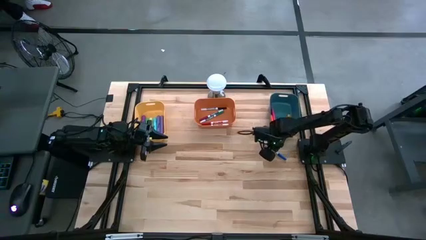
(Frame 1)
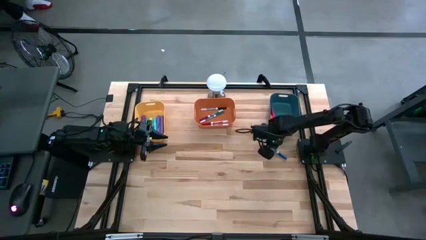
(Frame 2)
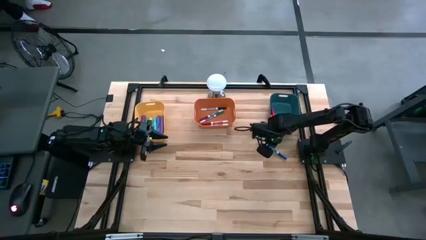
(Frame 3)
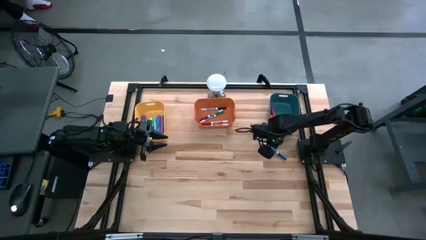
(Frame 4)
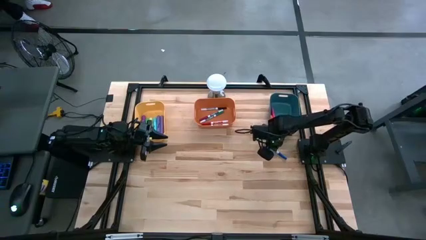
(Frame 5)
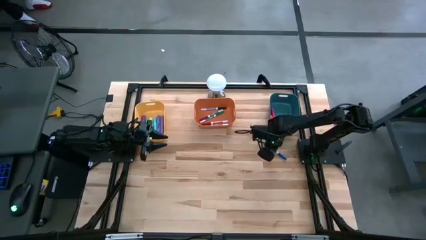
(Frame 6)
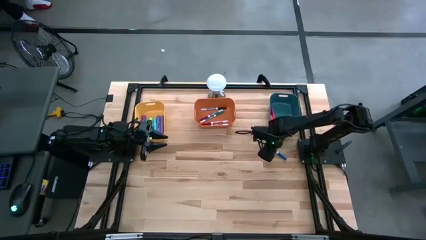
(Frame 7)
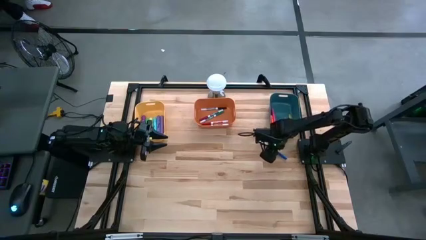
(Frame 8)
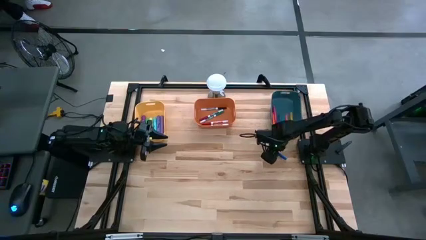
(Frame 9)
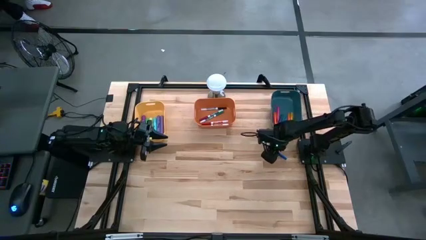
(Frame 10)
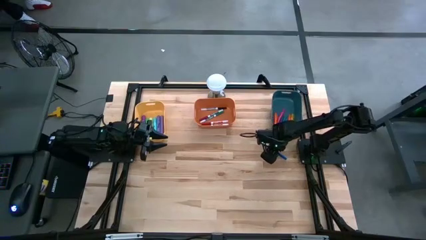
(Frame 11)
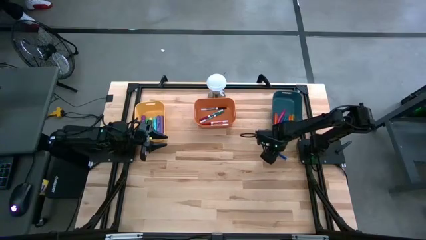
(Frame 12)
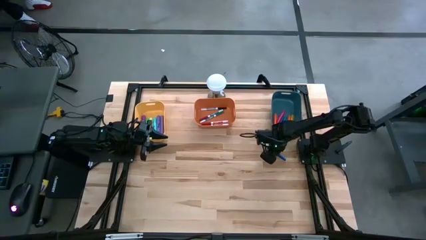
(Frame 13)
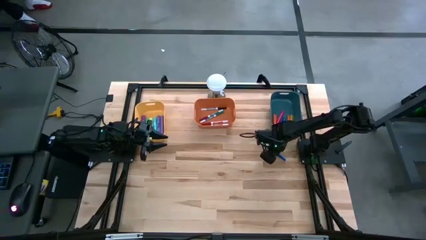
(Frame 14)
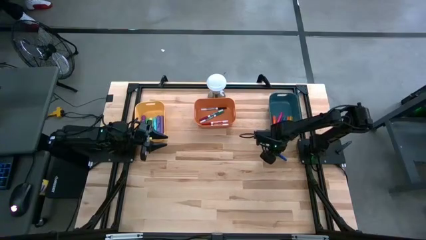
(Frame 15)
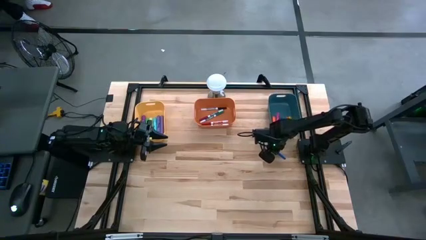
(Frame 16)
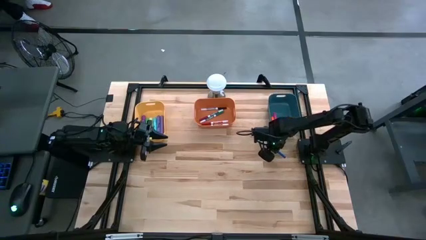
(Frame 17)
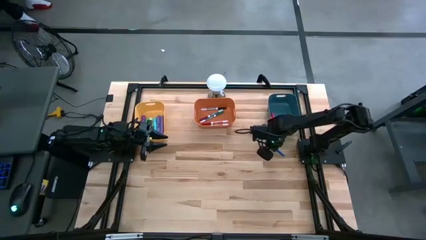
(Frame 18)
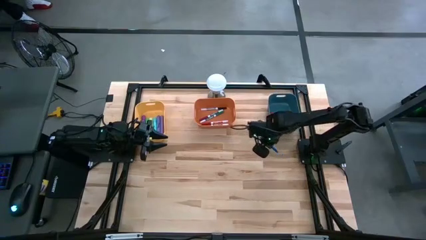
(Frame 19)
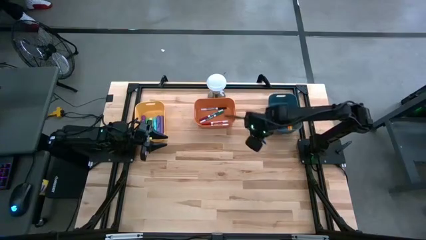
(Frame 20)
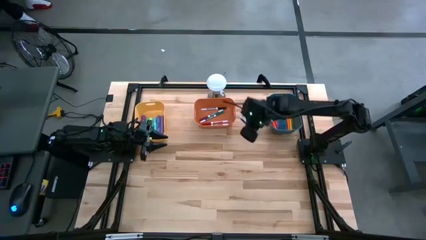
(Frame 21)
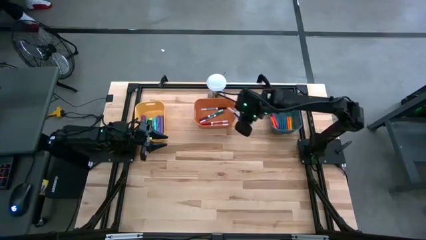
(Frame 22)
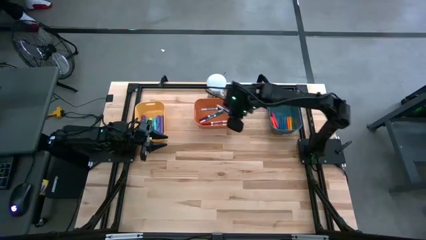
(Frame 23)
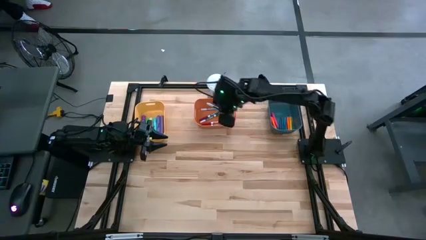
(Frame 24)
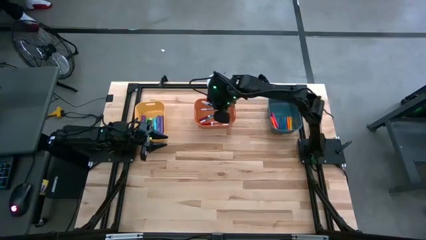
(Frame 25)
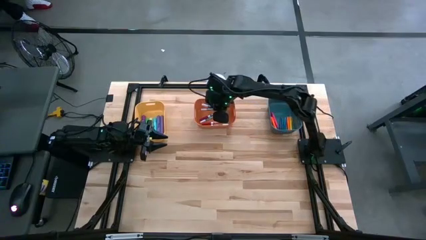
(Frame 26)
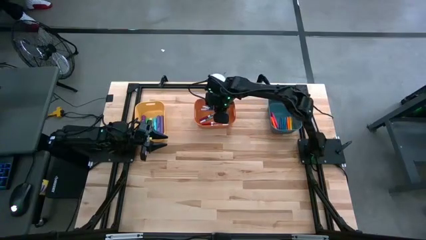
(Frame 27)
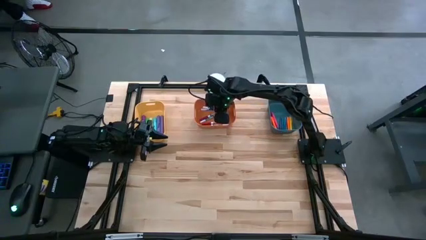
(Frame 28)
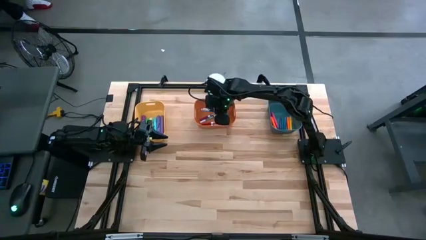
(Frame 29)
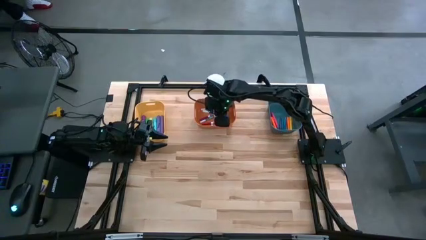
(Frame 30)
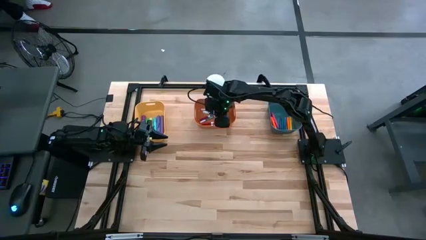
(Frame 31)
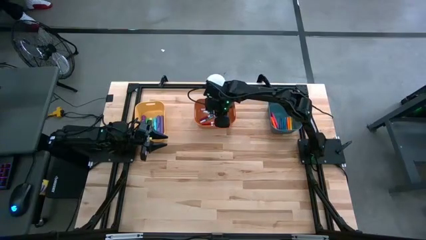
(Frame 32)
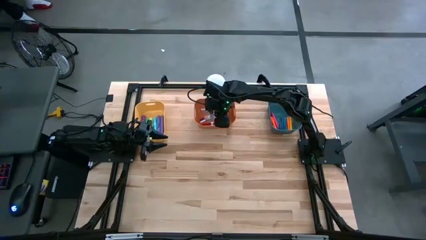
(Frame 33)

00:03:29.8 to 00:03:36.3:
Task: Pick & Place Markers
Put the blue marker pen into the orange bin

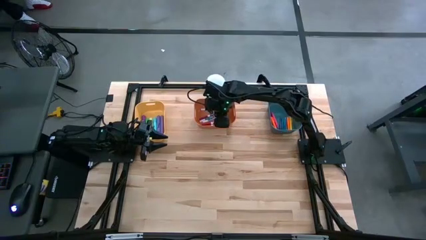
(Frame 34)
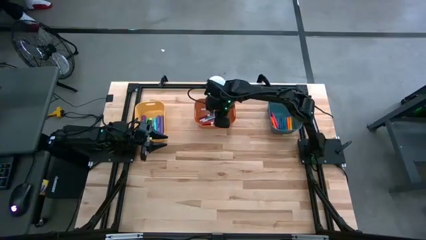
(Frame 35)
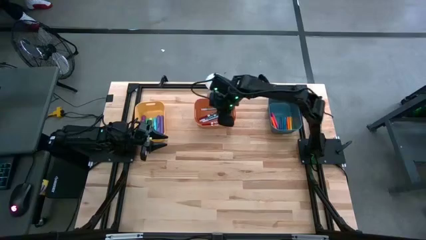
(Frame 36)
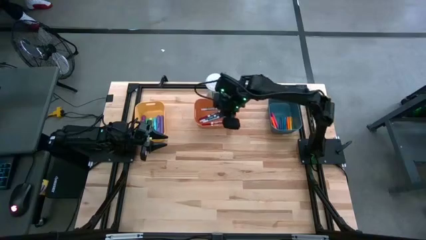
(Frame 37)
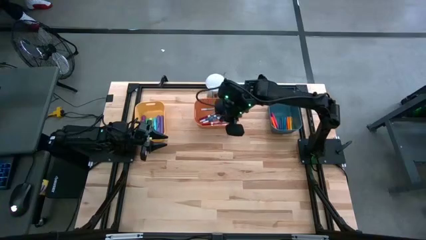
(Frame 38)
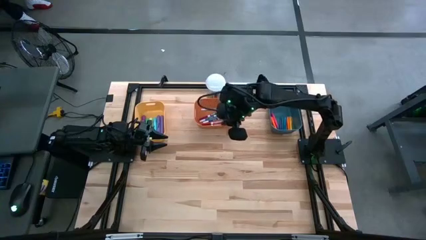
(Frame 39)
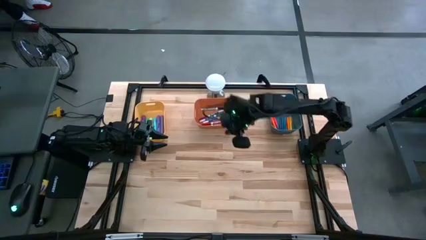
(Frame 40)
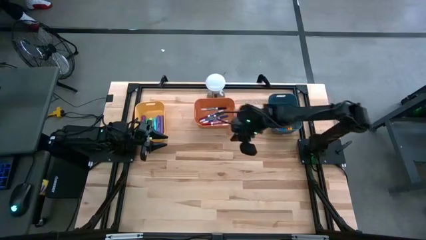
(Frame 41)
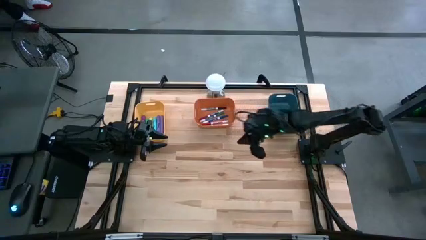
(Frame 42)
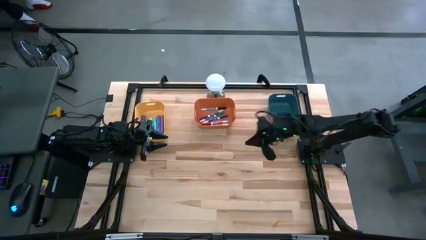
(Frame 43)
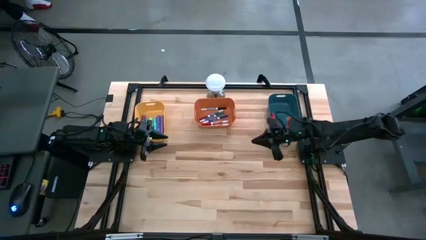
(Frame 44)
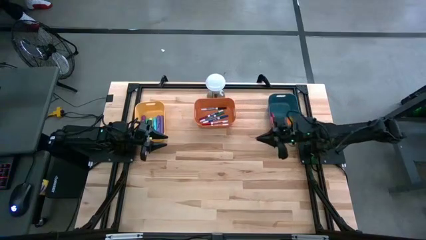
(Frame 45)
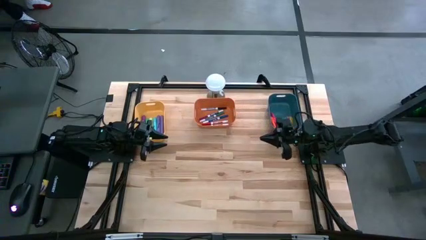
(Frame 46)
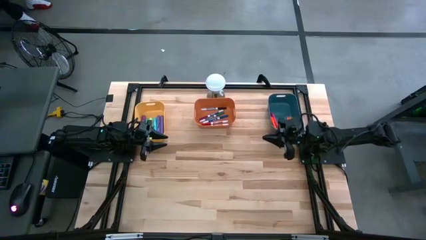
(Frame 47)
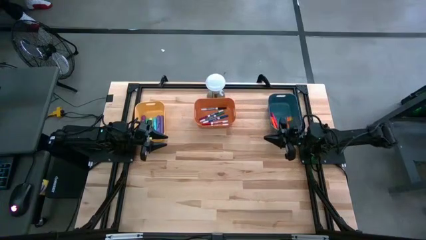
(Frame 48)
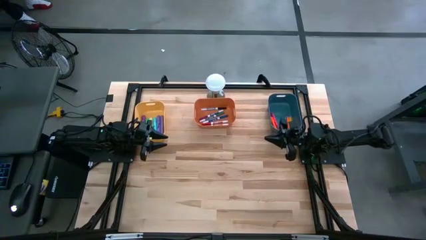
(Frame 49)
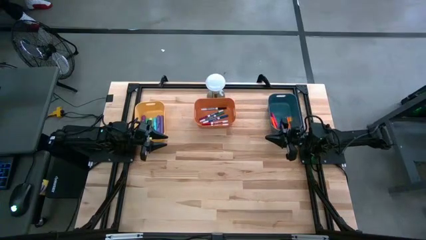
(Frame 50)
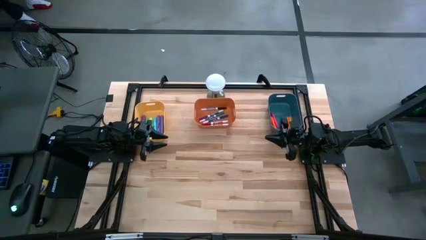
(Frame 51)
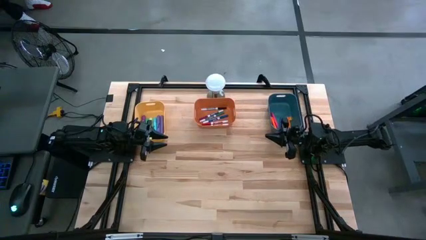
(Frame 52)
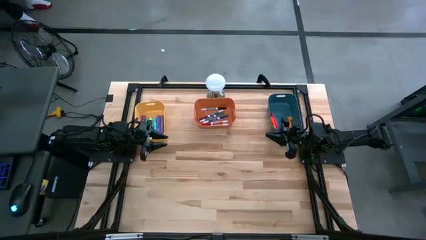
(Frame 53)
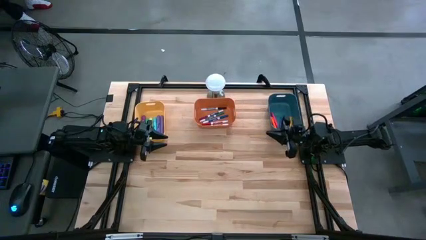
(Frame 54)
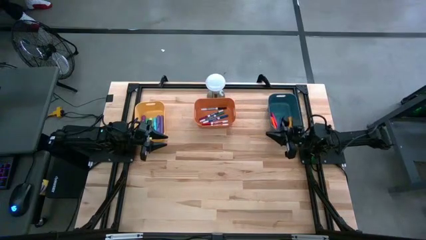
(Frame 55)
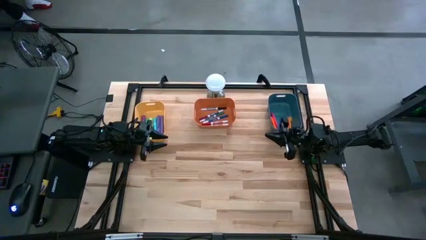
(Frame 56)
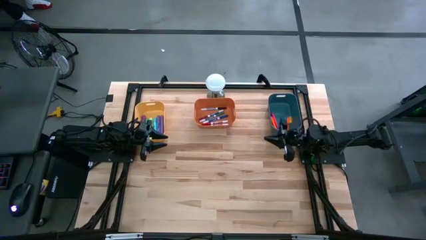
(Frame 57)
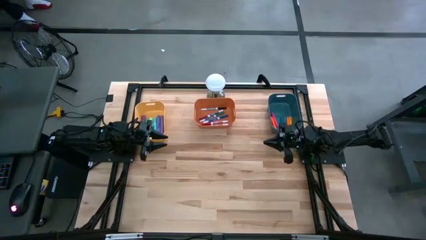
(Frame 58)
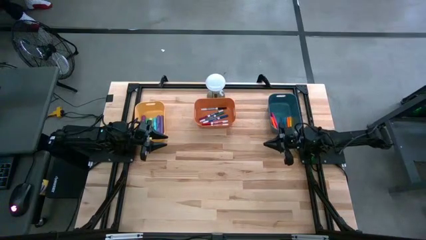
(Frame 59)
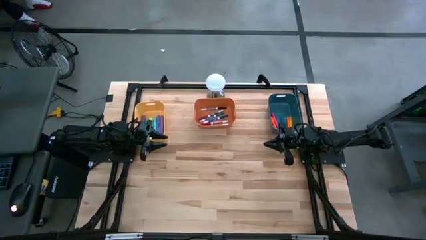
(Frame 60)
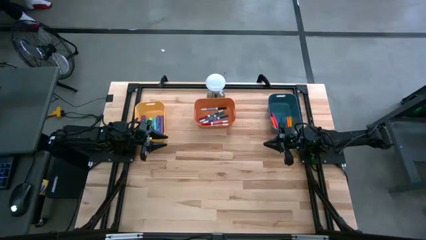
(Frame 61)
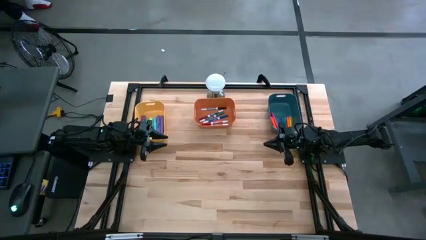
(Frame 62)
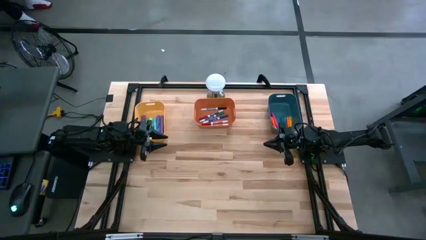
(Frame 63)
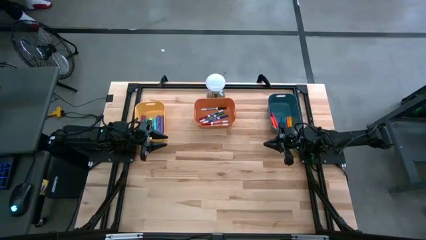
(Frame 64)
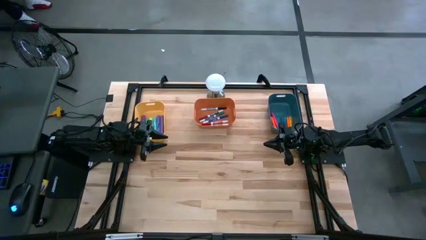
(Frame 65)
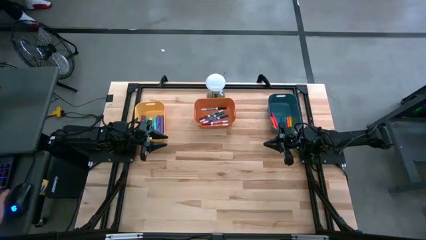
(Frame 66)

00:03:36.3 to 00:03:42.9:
Return to Home Position
